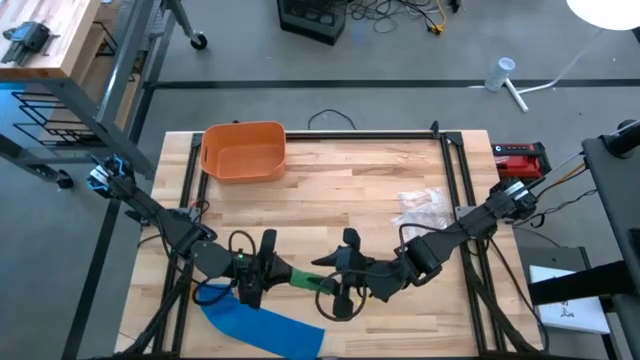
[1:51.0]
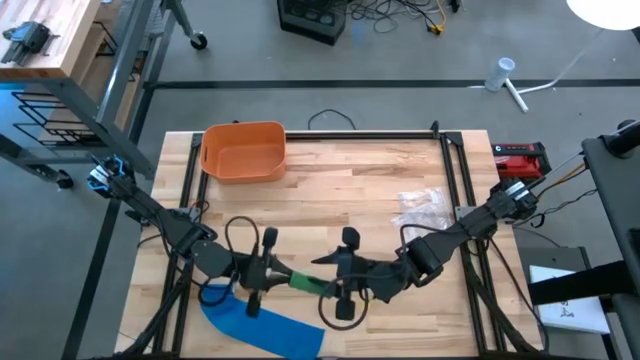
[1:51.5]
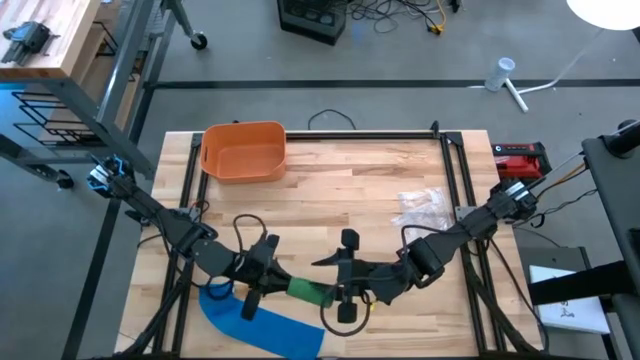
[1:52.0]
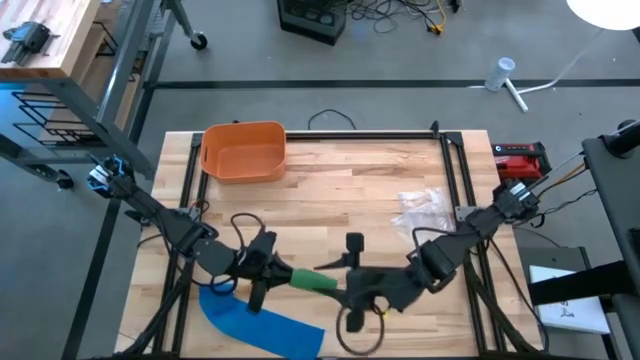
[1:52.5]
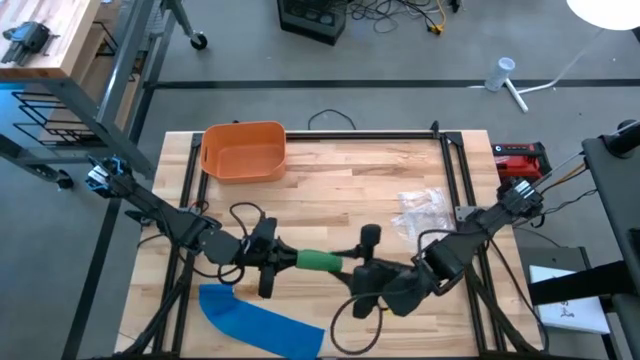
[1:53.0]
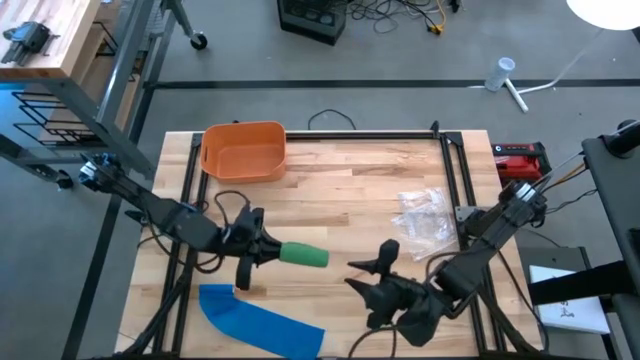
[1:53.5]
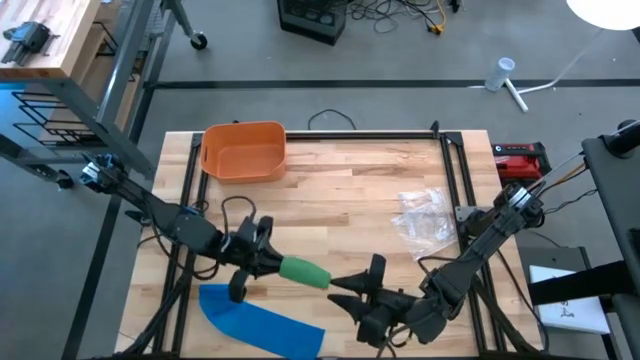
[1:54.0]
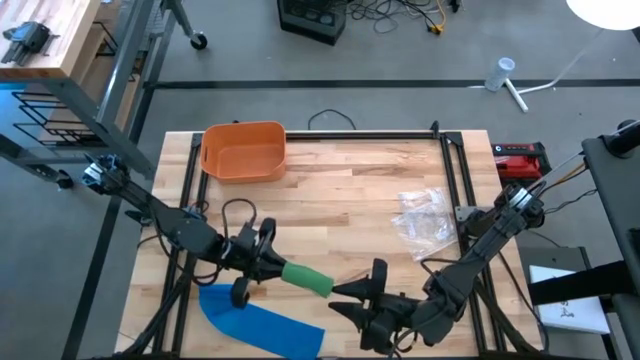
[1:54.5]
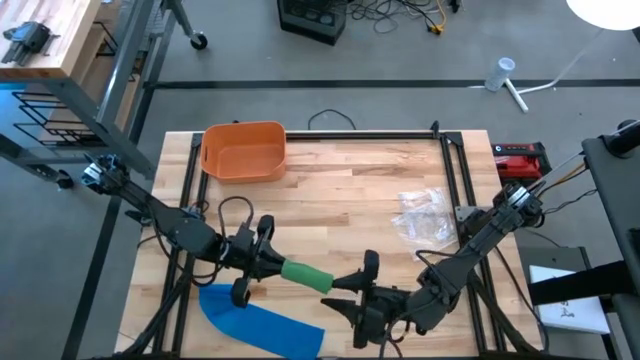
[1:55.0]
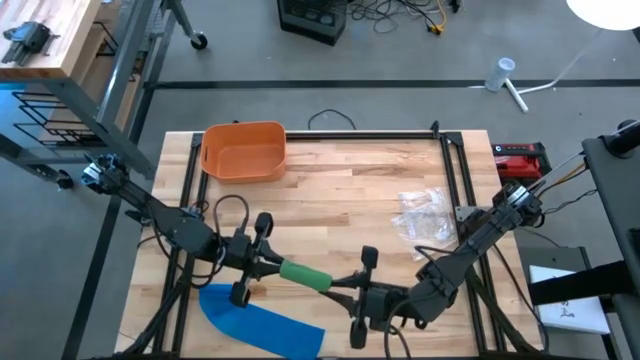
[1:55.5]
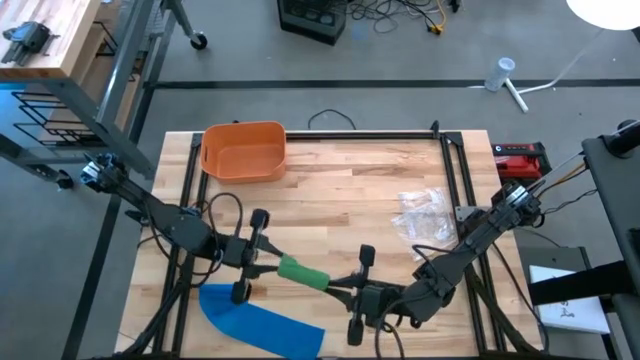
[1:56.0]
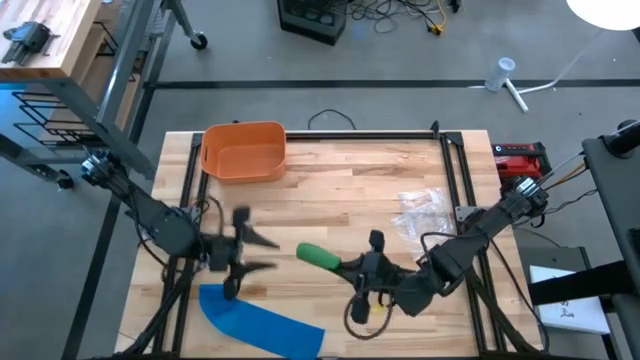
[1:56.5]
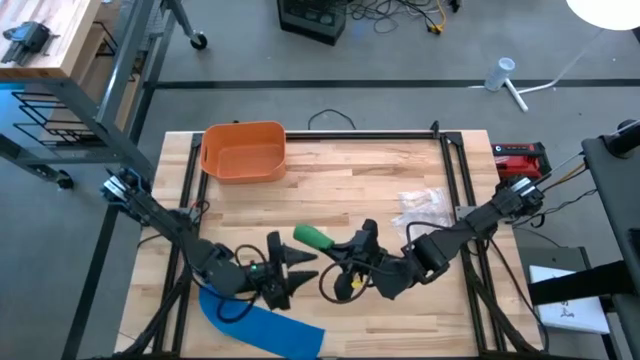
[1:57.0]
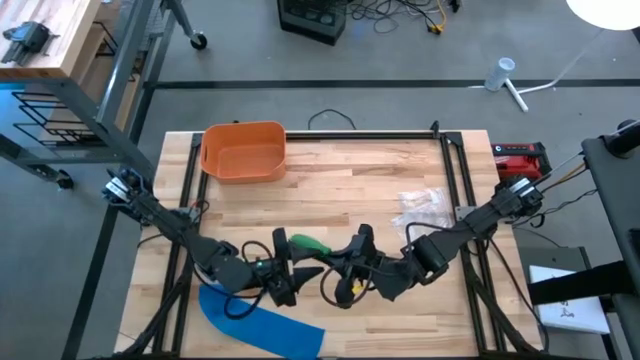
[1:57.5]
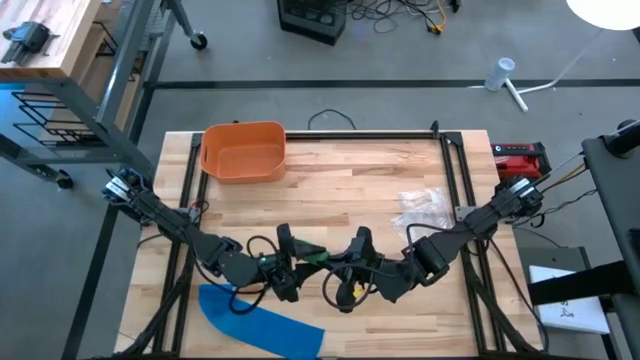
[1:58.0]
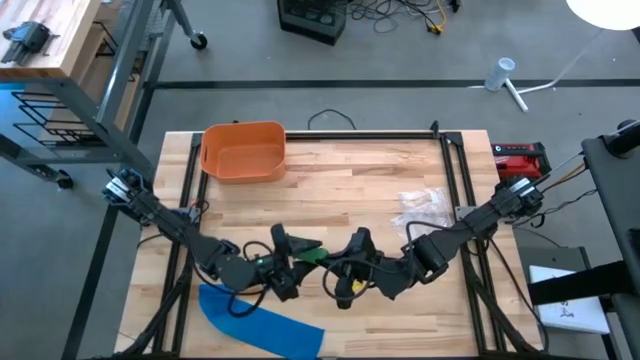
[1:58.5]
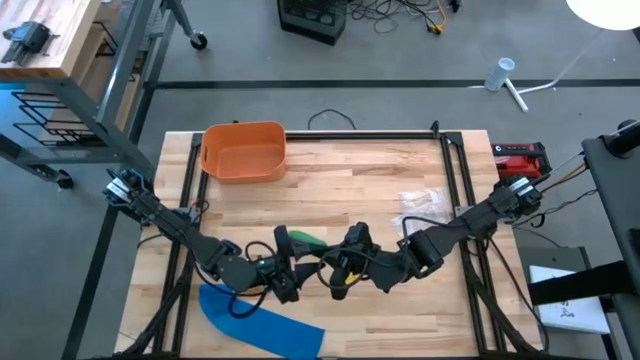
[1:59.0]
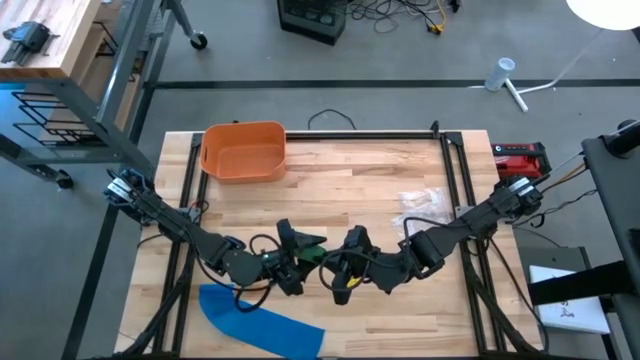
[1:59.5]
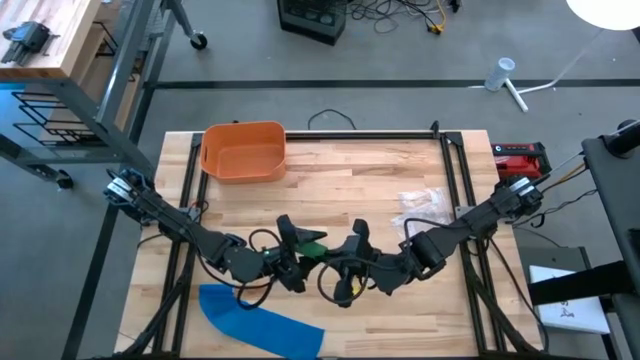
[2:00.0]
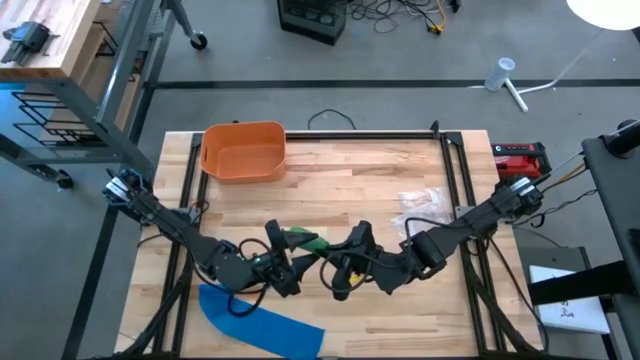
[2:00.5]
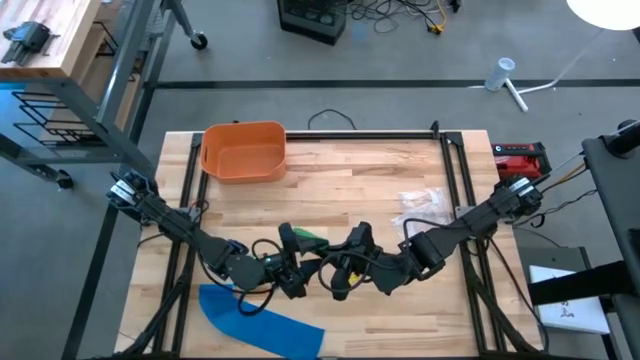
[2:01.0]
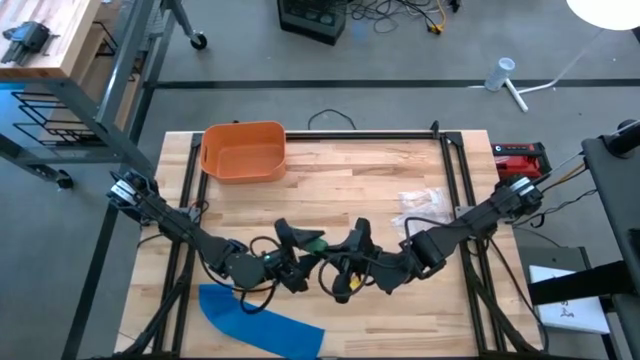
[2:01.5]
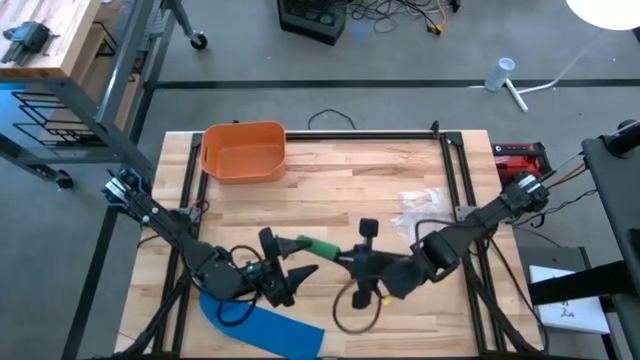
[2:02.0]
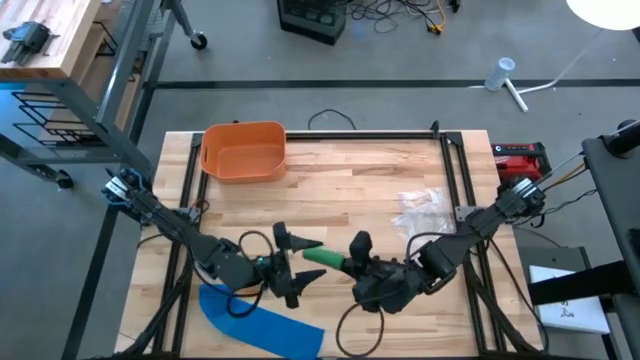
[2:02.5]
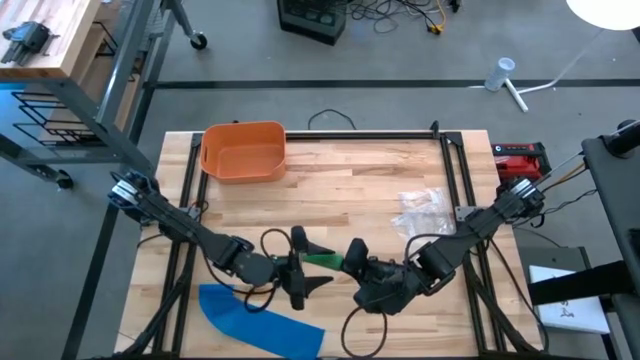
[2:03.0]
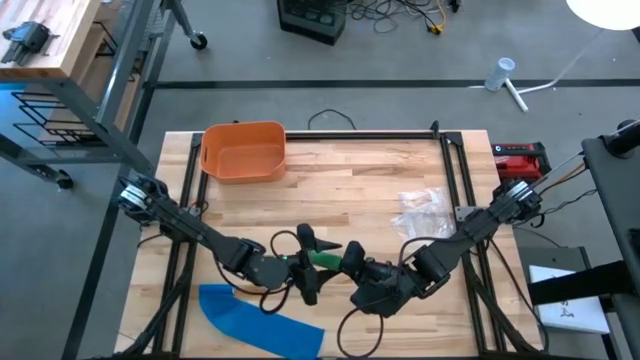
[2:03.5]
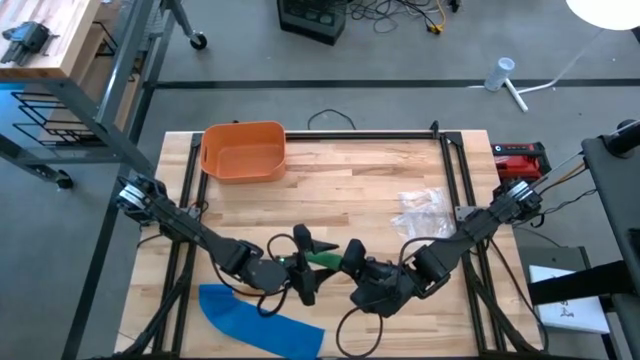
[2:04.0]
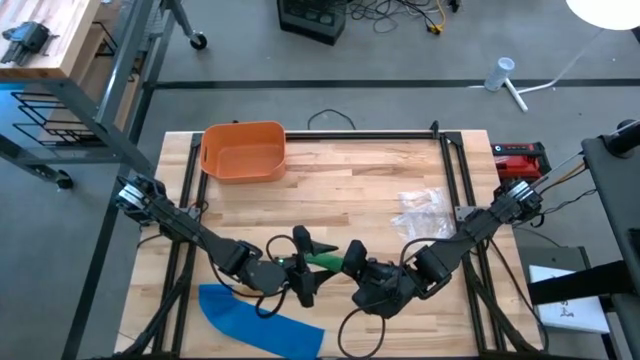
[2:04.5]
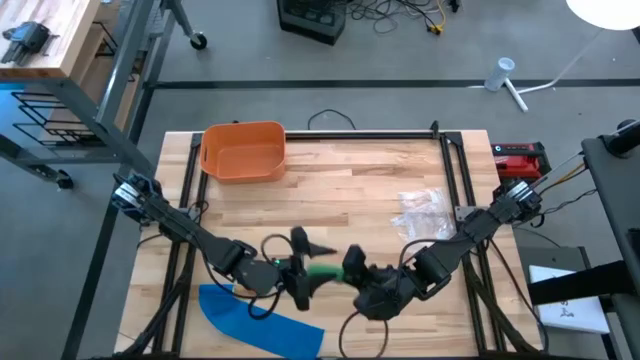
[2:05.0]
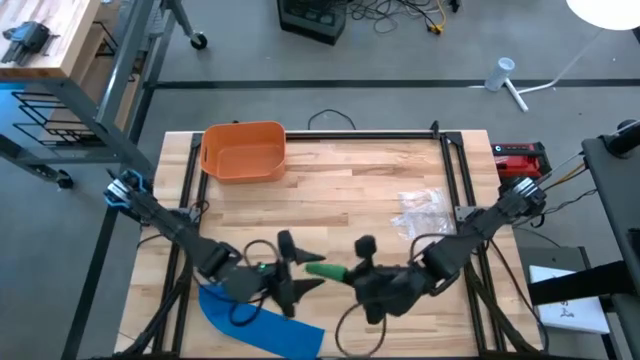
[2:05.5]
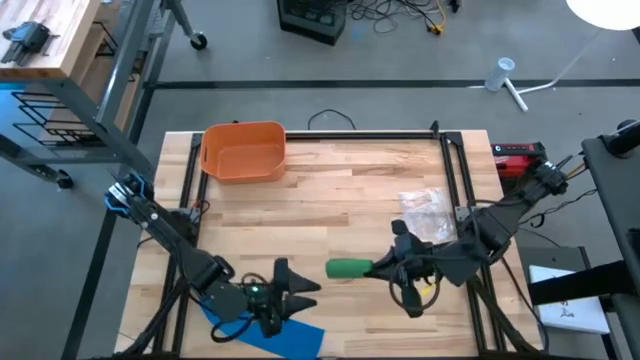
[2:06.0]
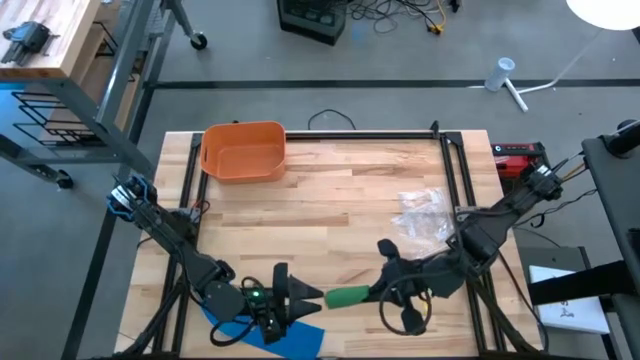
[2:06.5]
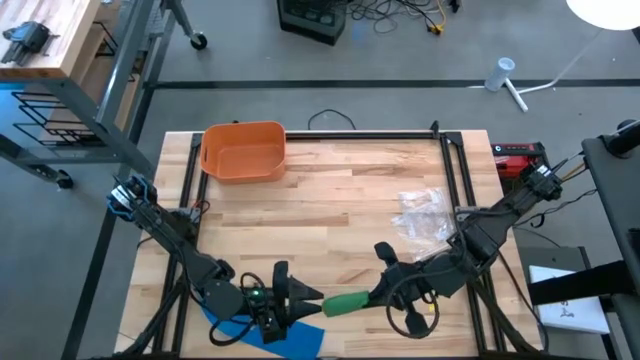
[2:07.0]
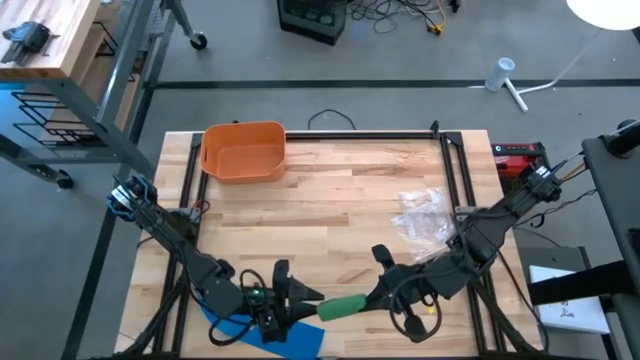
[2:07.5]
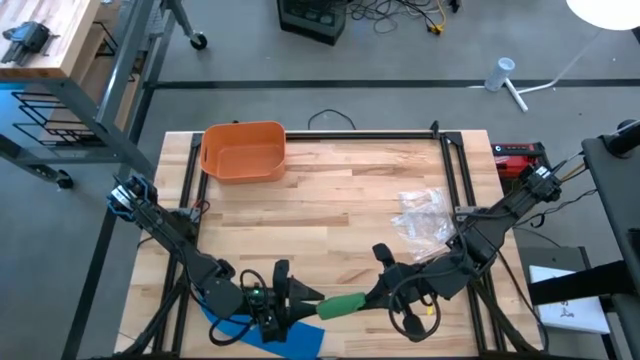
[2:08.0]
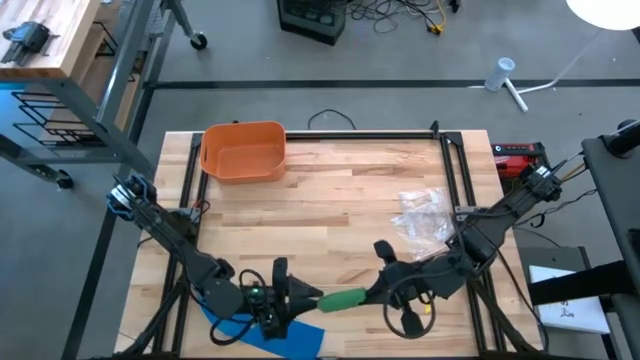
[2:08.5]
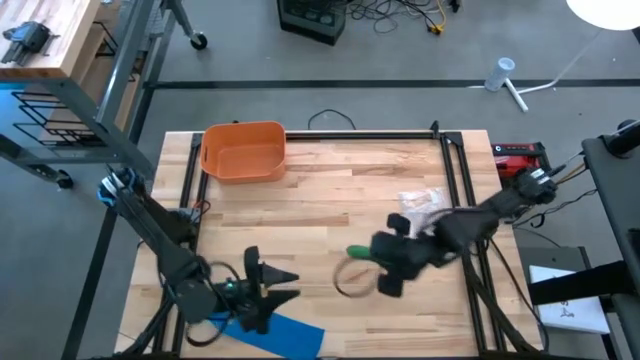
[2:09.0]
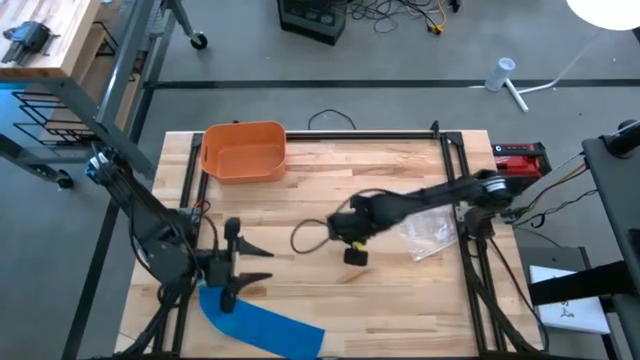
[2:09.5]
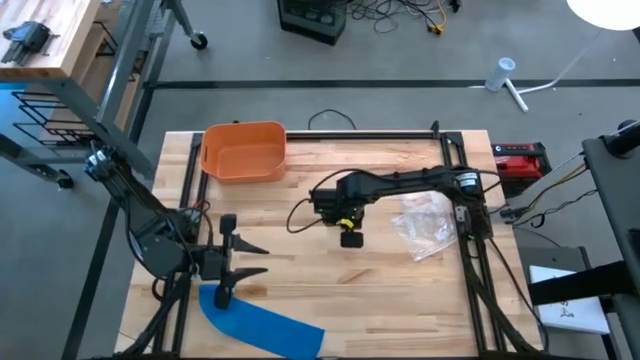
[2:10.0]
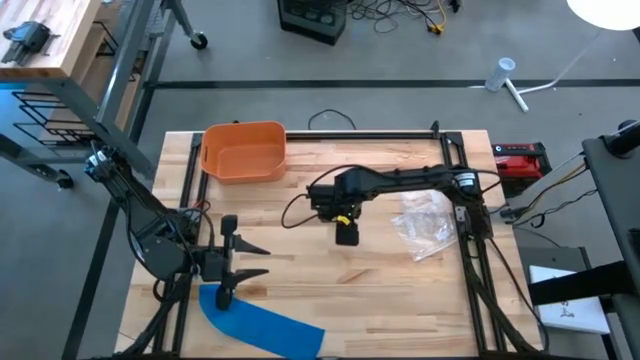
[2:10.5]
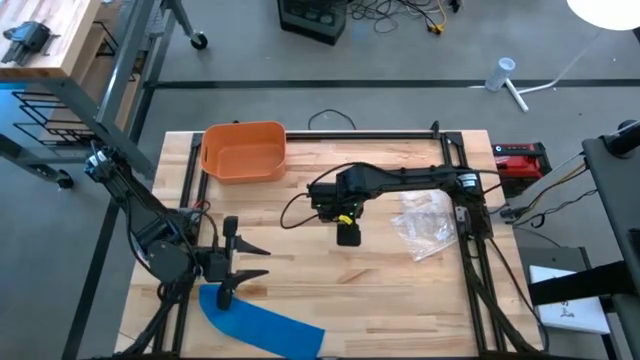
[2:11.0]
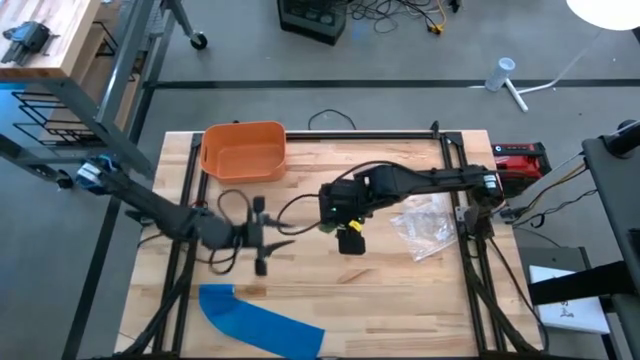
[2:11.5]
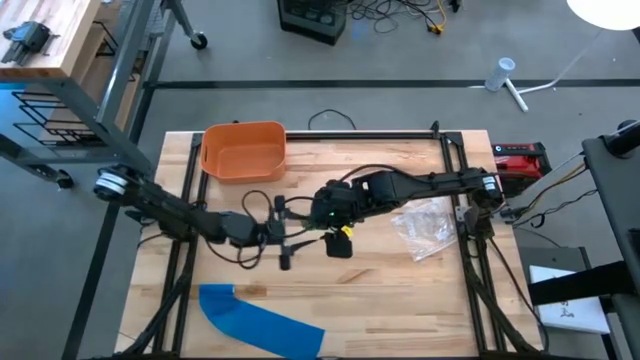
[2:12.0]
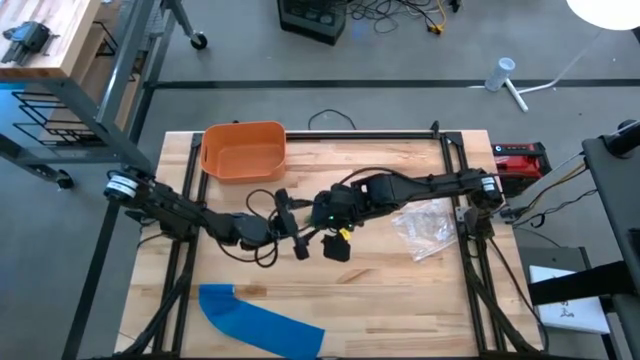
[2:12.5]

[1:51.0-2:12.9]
Task: Roll bandage
Roll the green bandage
